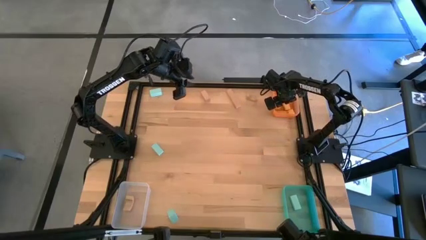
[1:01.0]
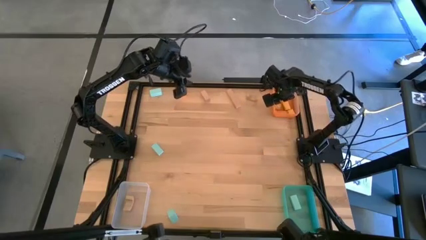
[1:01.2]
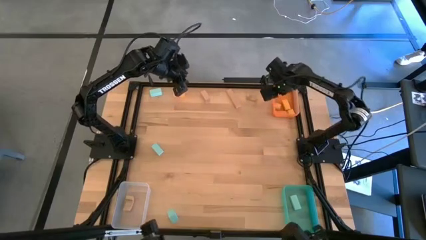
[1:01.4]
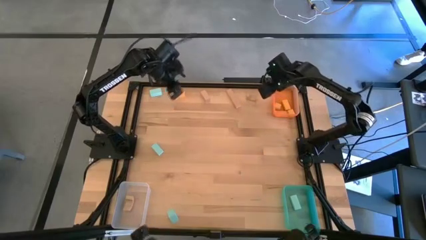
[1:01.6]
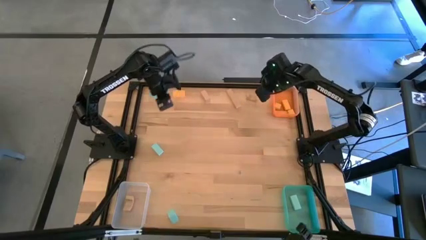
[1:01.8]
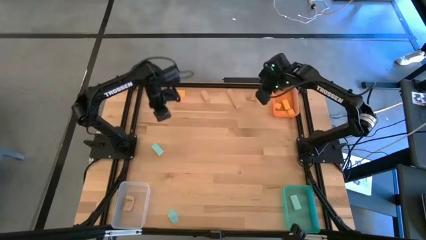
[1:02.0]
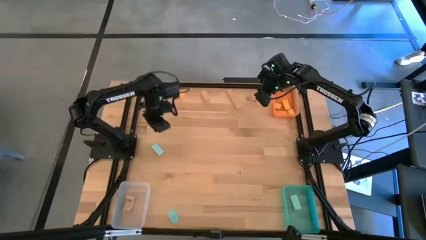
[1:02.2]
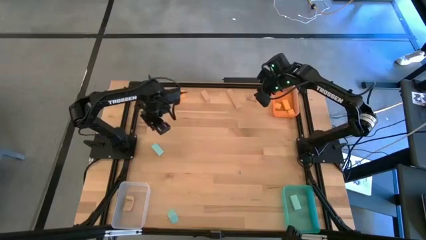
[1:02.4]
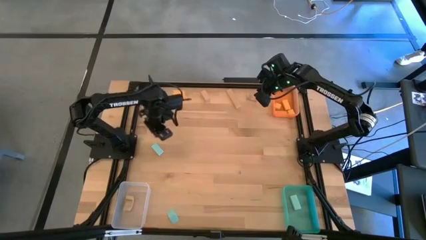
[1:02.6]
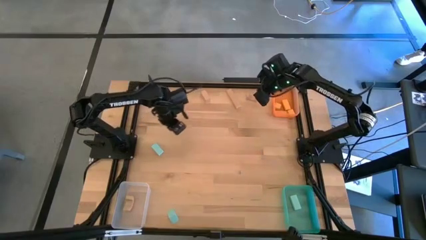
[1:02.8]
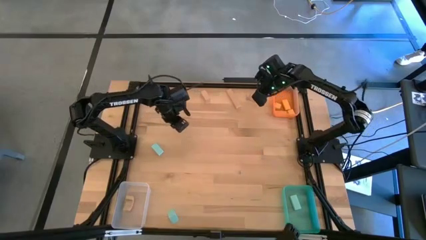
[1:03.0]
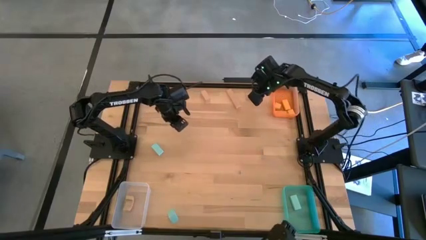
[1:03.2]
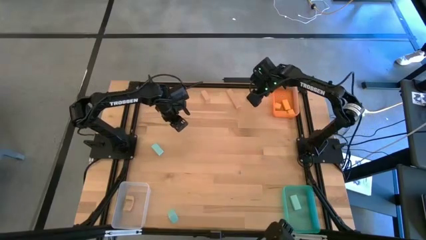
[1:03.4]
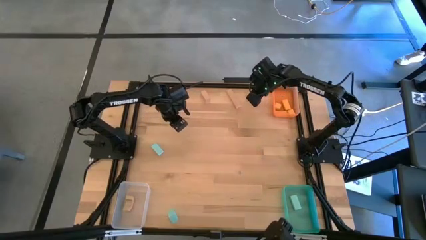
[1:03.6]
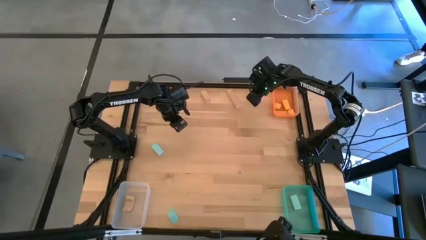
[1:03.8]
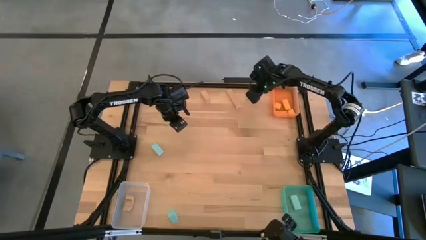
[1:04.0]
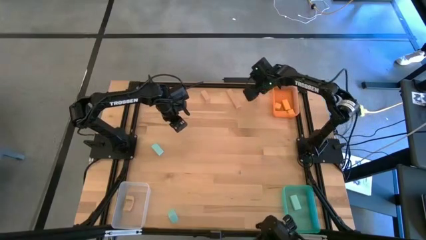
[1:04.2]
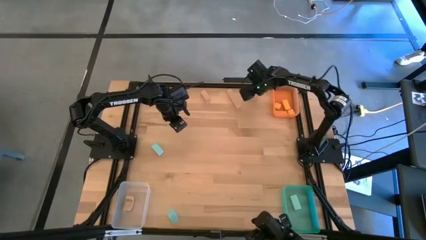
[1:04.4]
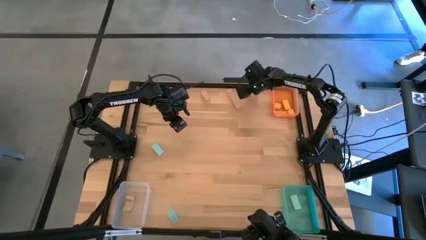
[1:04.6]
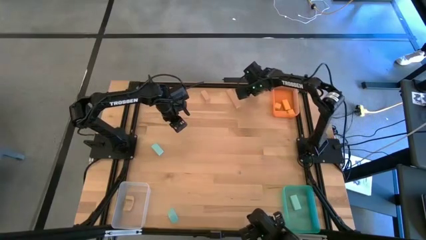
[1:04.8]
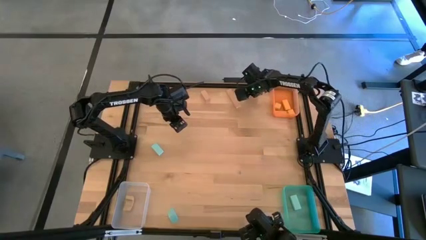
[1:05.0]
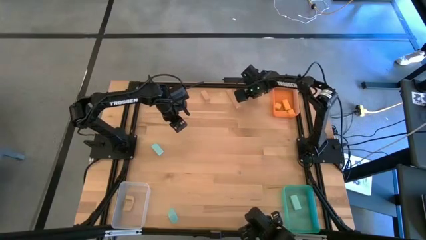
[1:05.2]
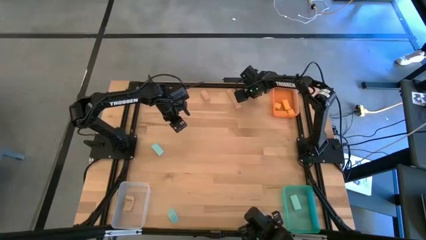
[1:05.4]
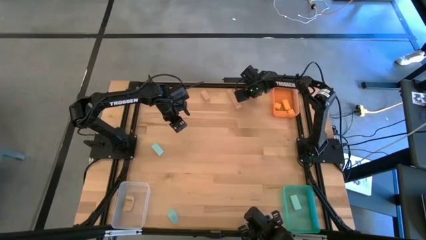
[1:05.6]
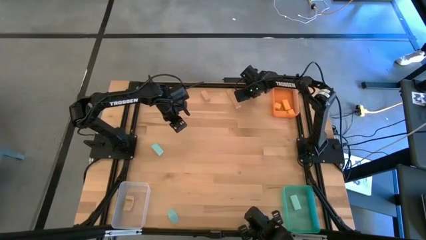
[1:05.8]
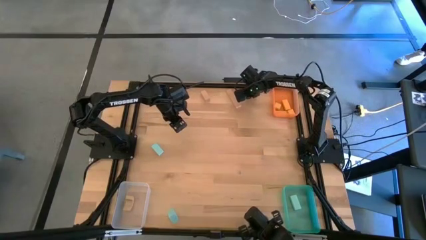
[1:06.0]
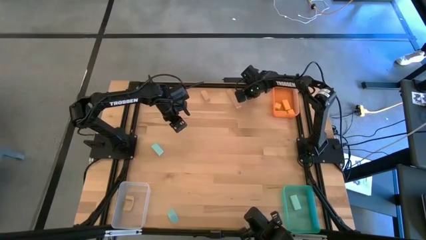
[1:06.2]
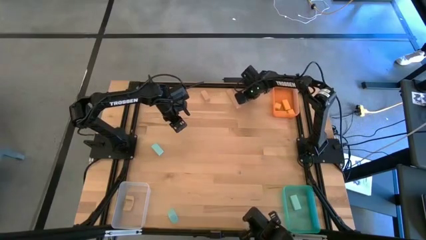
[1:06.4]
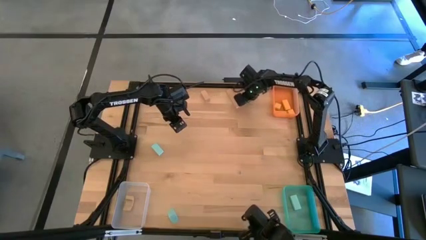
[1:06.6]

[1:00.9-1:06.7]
Task: Sort & place blocks by color
Put the brown block into the transparent bin

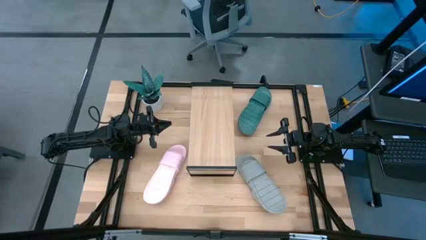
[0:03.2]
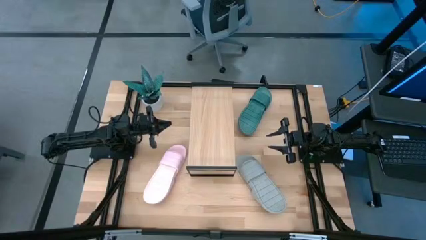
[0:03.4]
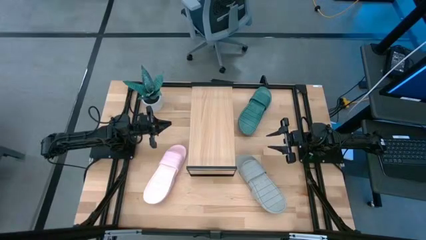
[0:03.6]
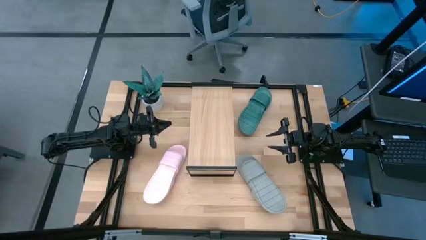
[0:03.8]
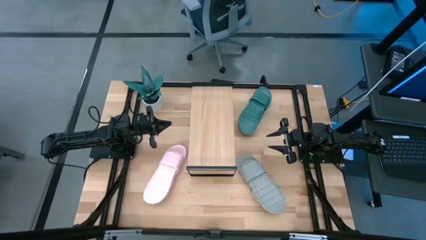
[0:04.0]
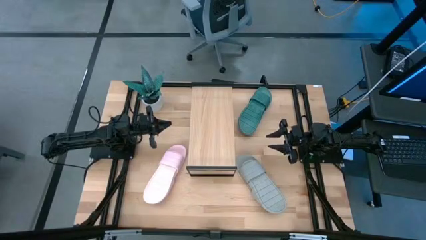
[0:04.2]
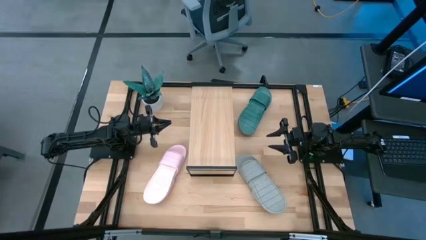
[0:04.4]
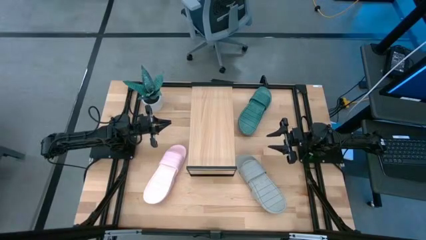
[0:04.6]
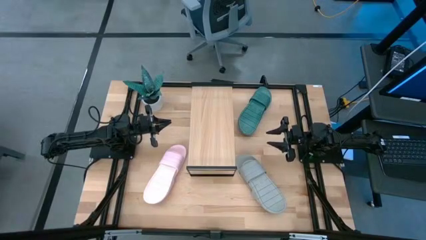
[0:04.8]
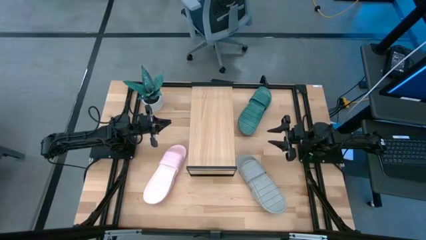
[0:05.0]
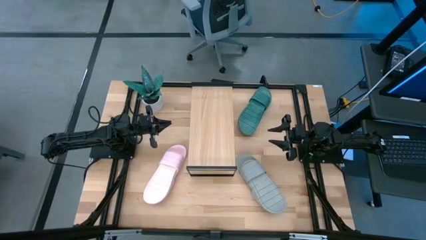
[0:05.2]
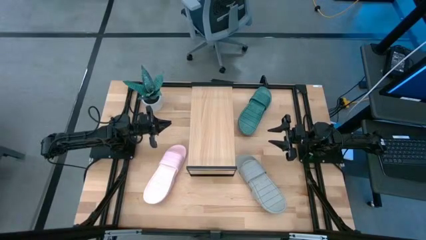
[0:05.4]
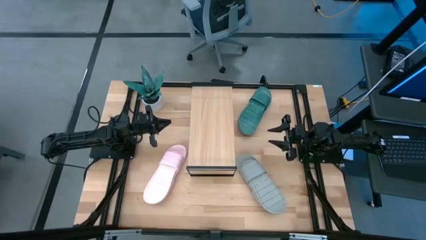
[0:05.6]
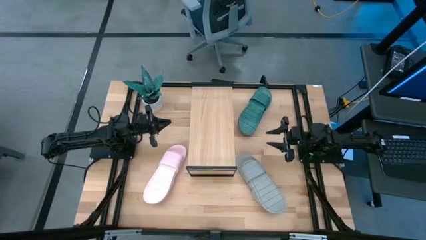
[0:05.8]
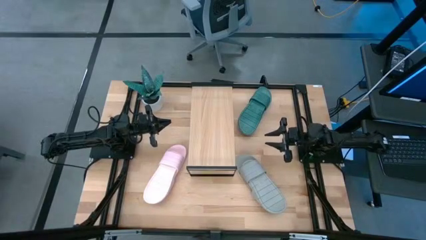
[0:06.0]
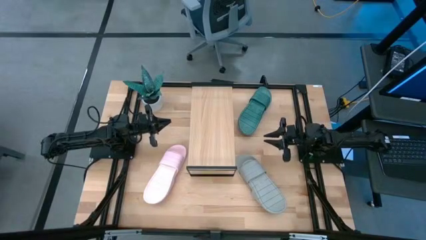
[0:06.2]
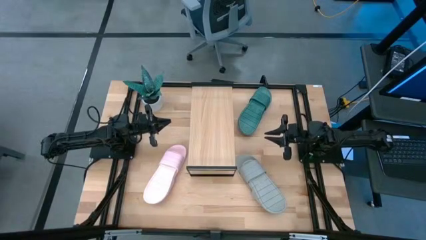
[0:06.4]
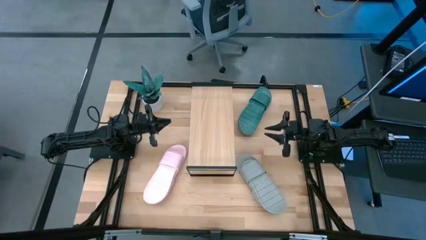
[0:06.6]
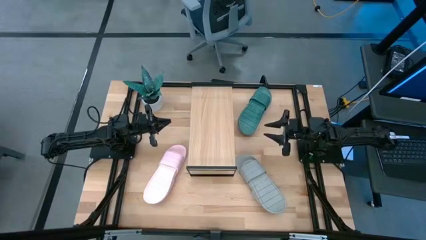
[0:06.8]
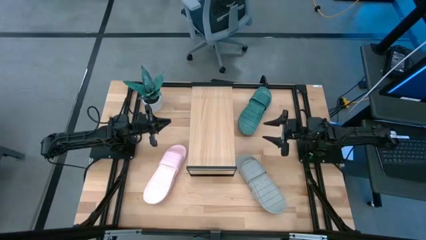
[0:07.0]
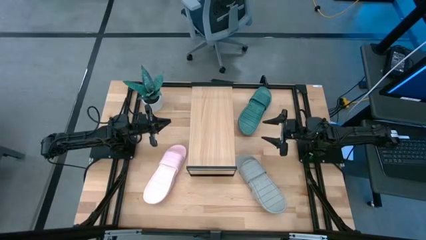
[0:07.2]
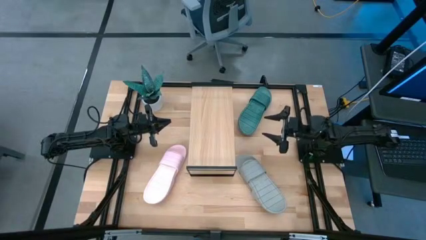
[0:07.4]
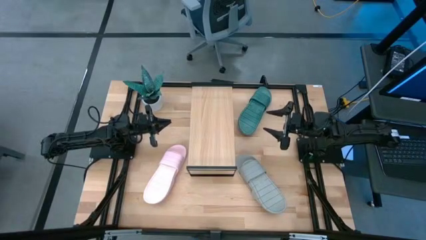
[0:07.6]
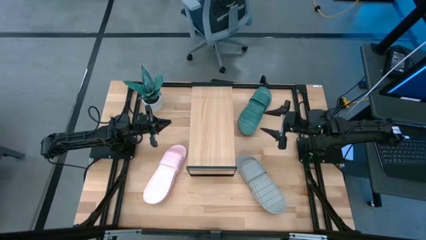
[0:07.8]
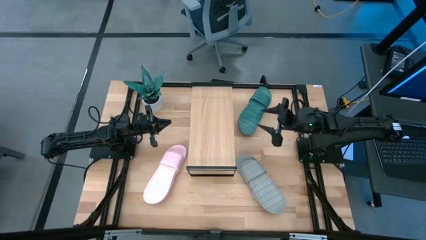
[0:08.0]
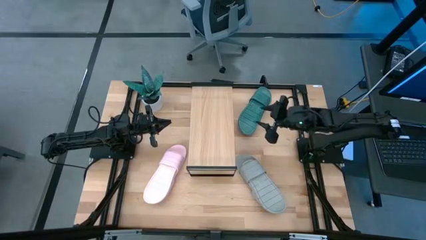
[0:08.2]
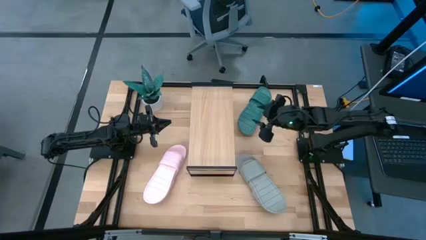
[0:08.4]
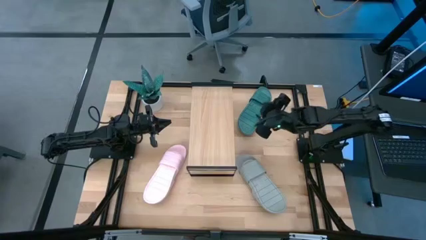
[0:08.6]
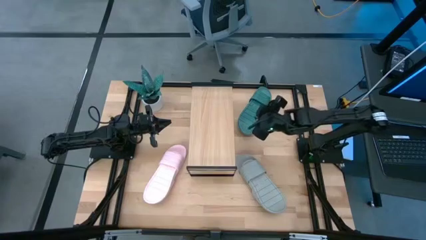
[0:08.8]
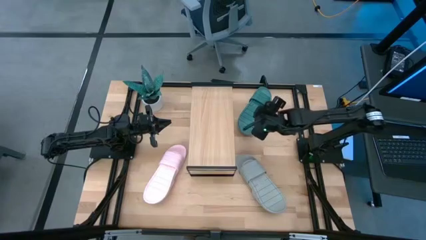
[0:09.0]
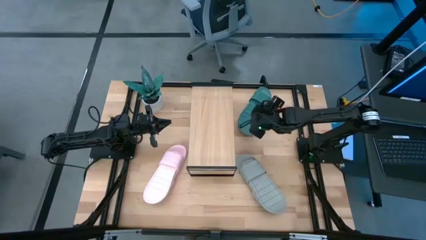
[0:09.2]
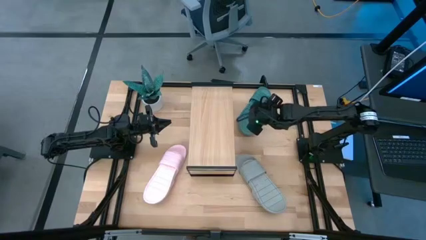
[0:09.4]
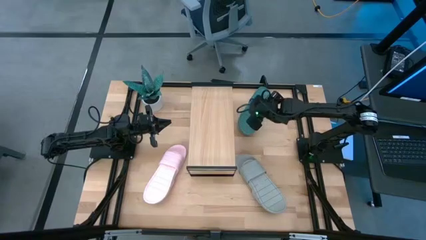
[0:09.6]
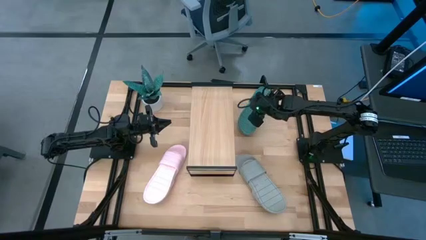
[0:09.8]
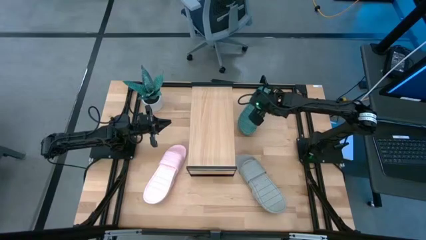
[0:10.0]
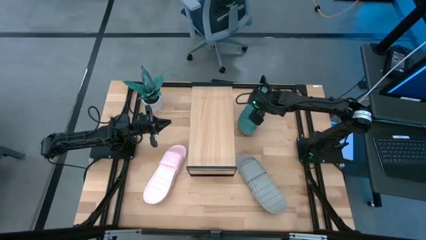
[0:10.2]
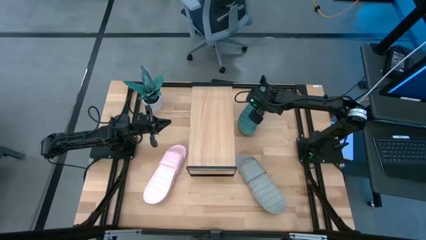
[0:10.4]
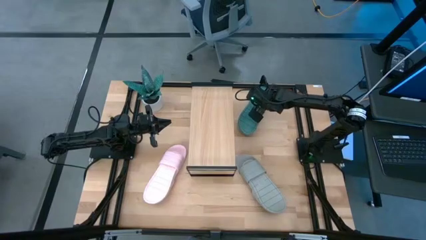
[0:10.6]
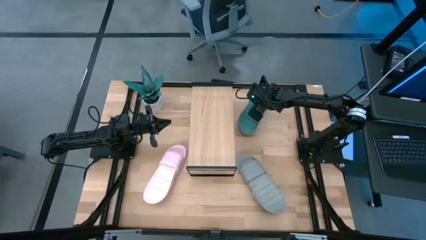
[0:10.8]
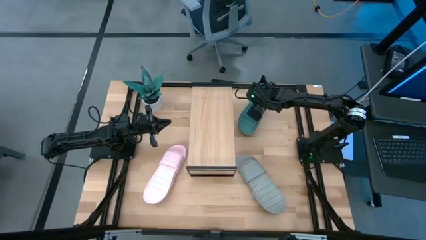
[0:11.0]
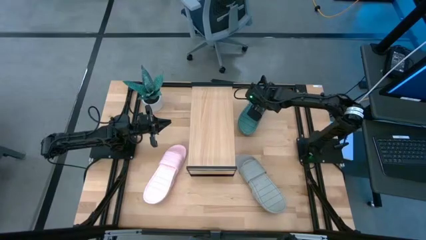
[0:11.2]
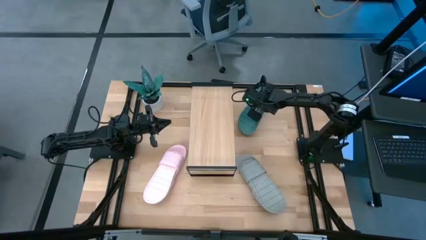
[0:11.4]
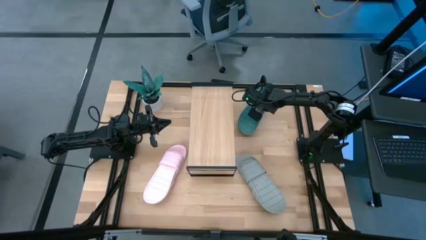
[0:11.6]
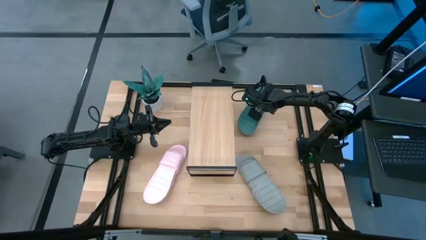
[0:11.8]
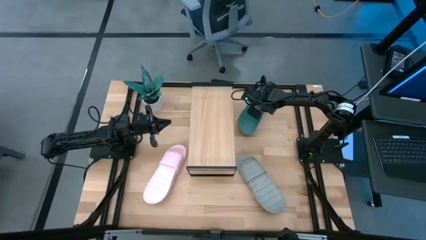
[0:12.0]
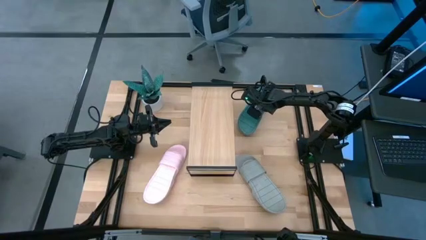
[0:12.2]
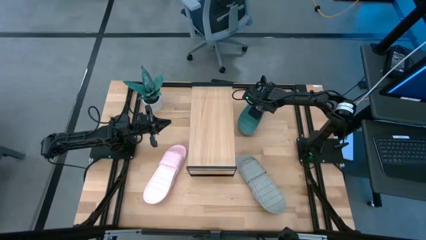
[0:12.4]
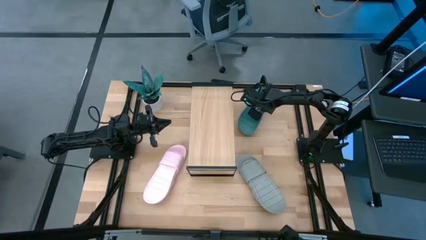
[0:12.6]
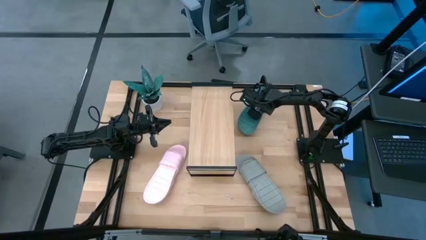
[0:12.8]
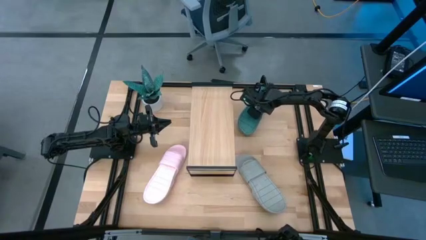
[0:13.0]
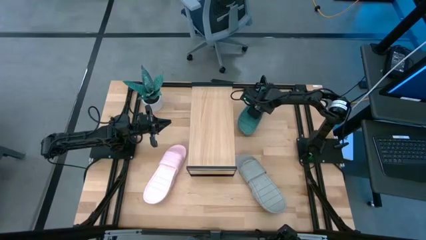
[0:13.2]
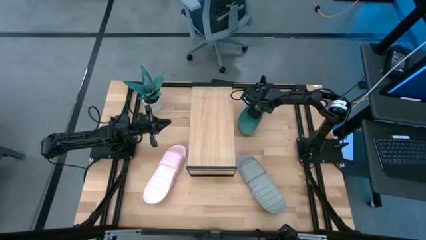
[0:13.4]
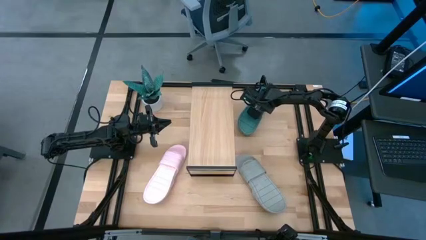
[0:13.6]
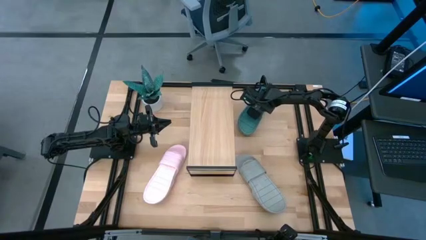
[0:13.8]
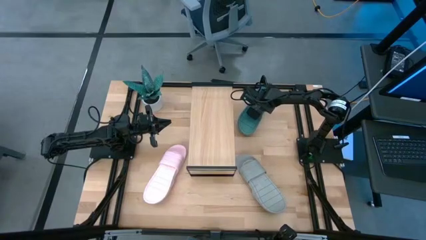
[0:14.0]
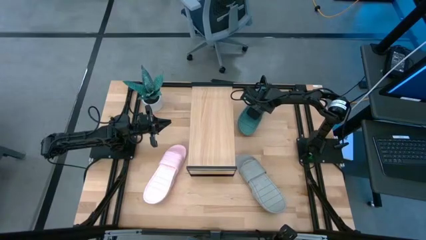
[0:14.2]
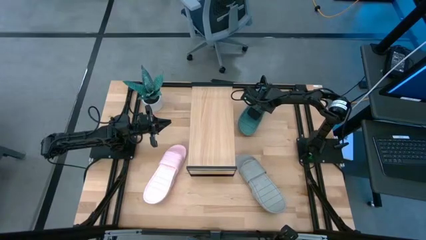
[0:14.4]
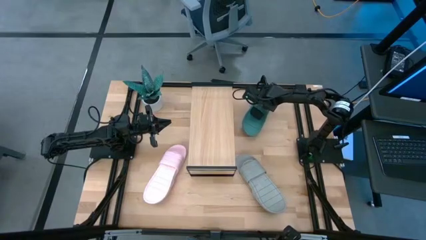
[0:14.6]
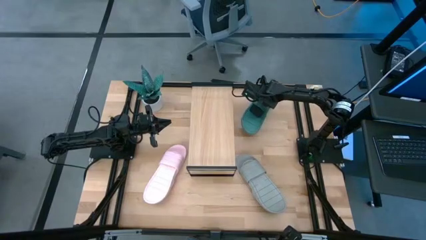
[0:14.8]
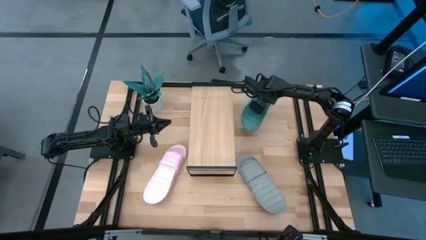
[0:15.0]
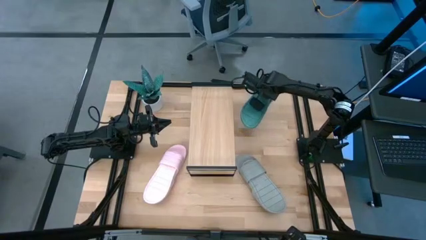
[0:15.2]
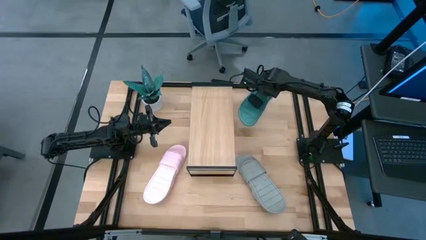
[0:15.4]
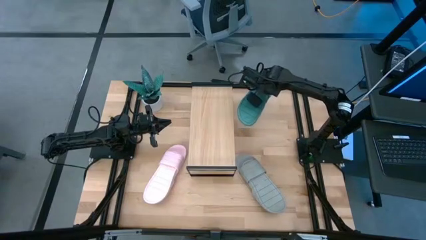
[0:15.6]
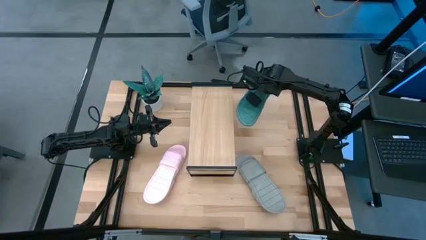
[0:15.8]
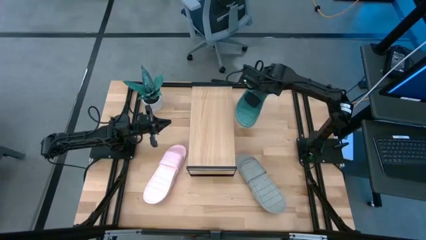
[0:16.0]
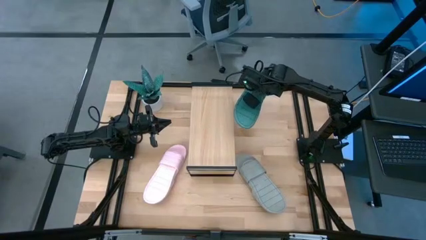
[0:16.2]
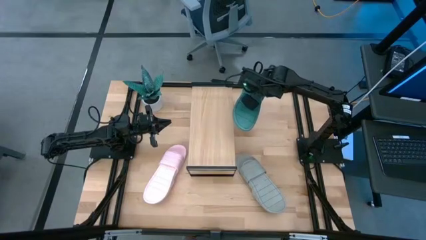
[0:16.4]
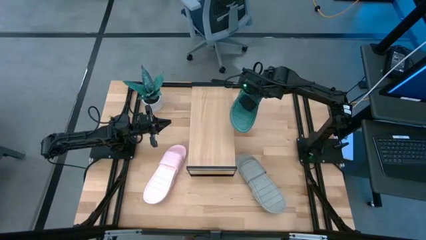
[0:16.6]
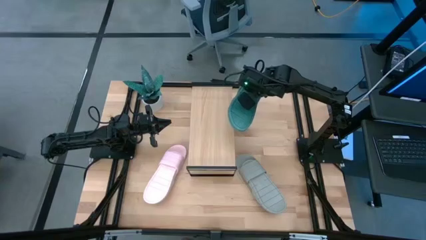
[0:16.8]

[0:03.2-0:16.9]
Task: Pick and place slippers onto the shelf
Put the green pair of slippers on the shelf
